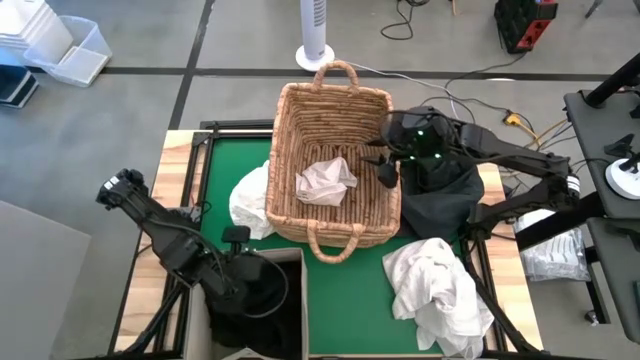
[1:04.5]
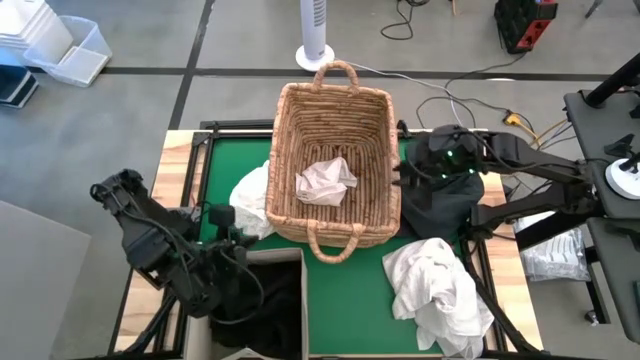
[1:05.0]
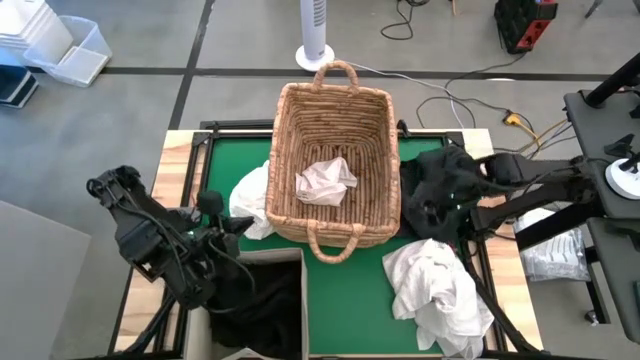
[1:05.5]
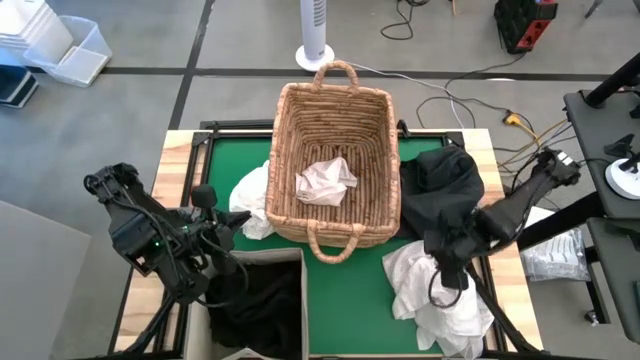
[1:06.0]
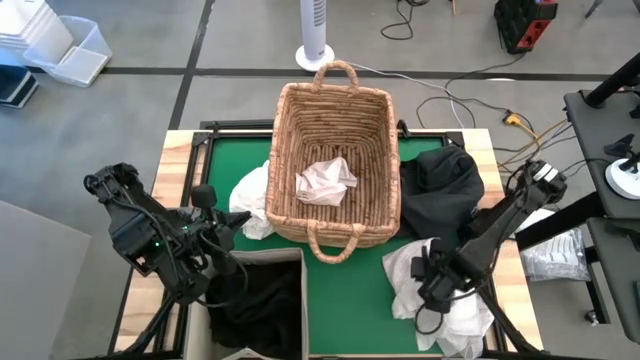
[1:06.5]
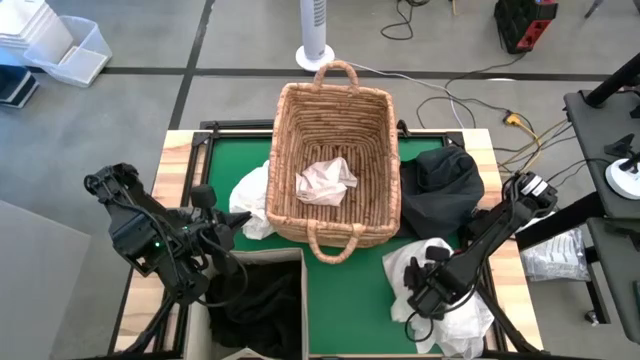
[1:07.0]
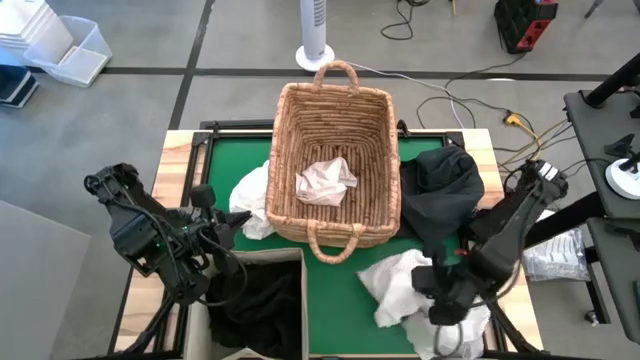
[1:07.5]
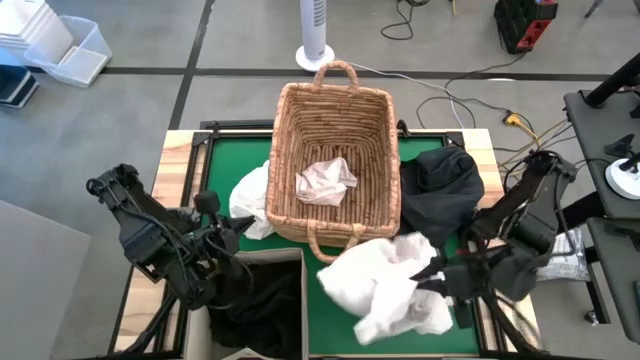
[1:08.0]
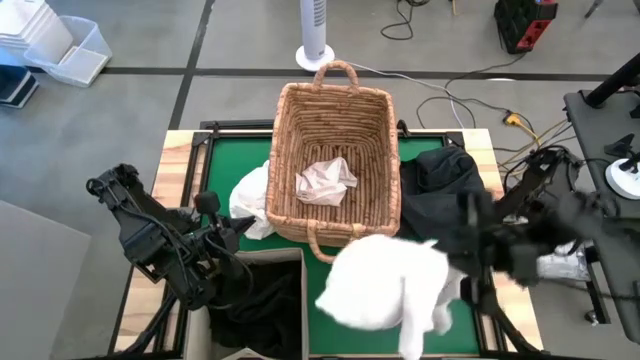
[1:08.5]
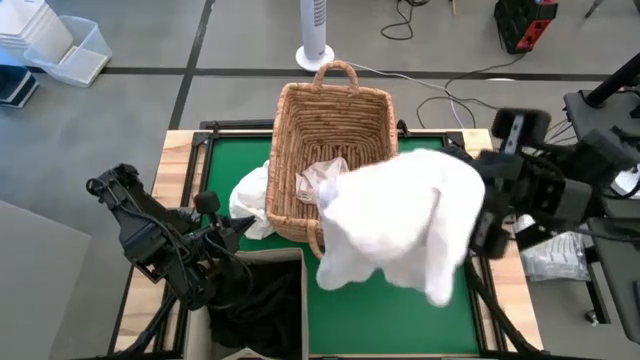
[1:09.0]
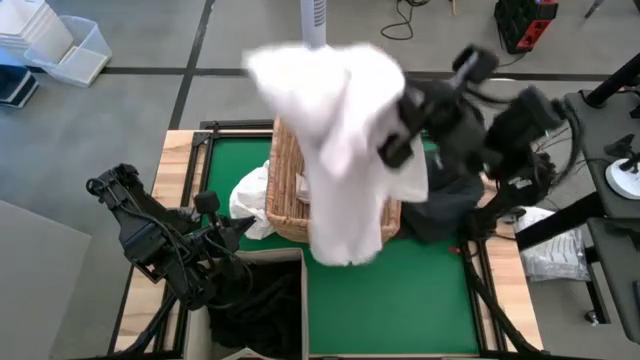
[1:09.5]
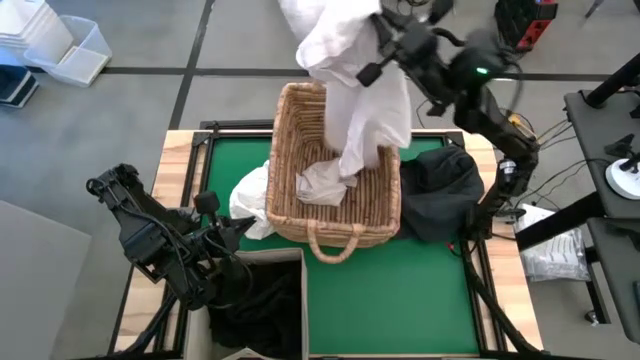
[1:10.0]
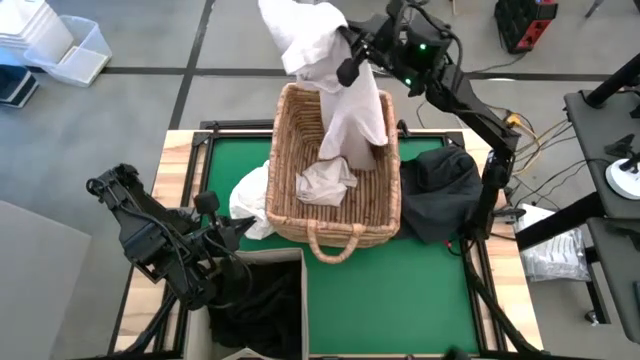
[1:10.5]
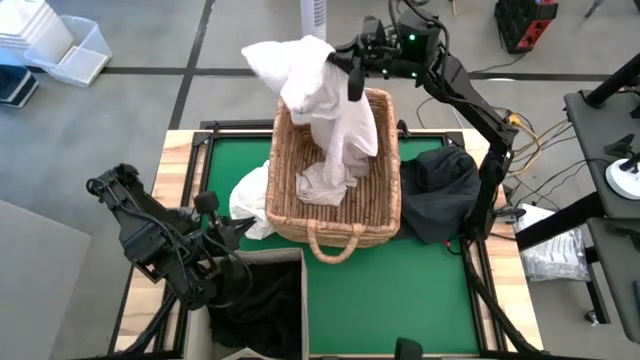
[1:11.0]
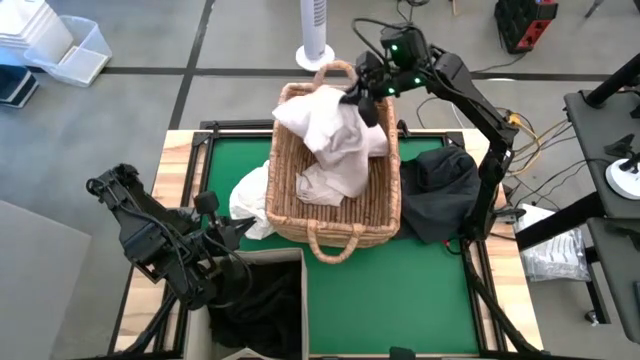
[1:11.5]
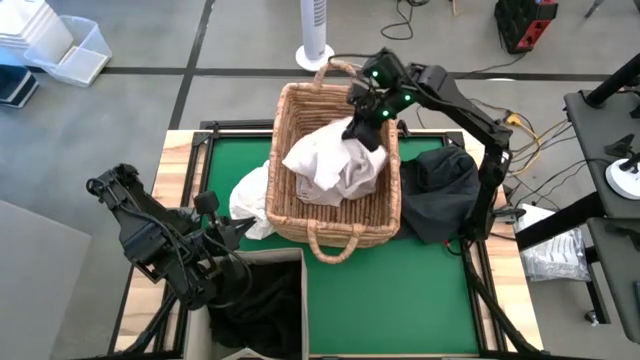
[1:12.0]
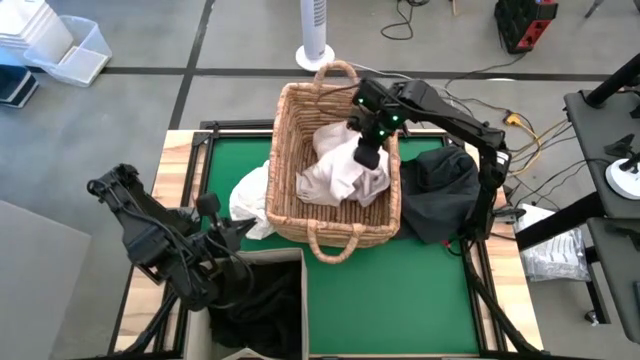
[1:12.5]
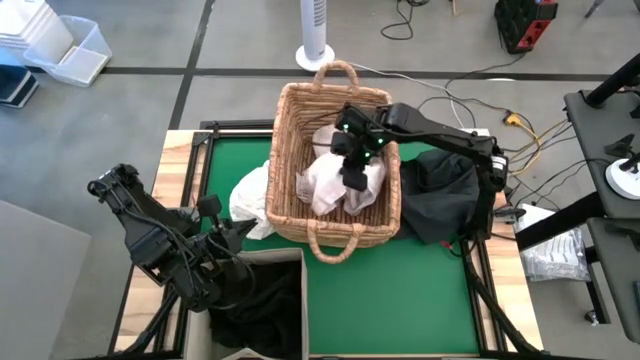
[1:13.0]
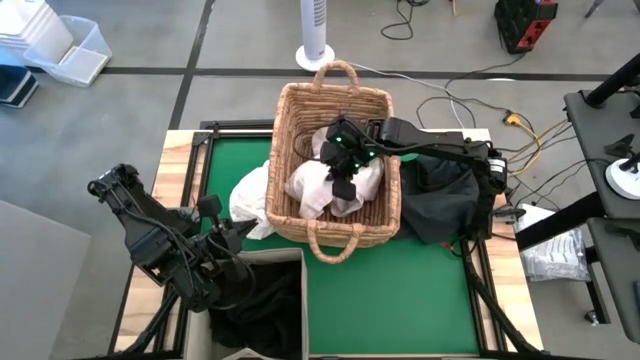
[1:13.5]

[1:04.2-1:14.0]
Put the bottom white shirt into the brown laundry bin

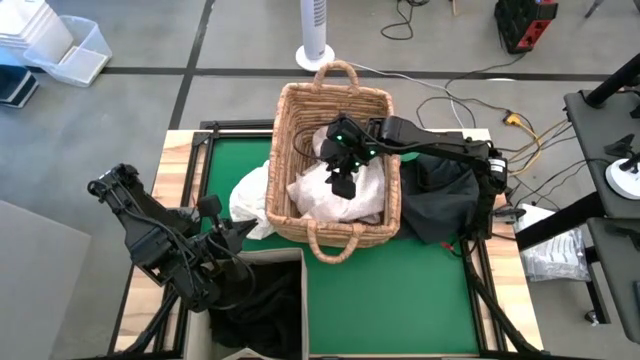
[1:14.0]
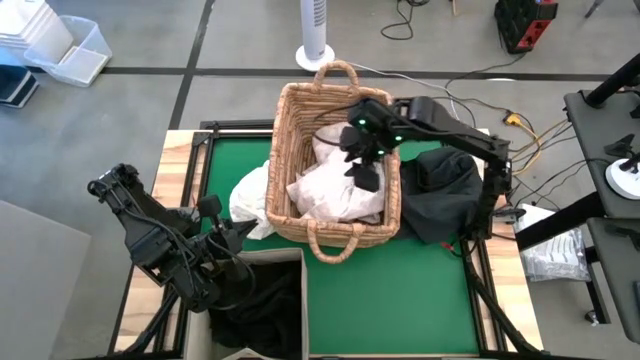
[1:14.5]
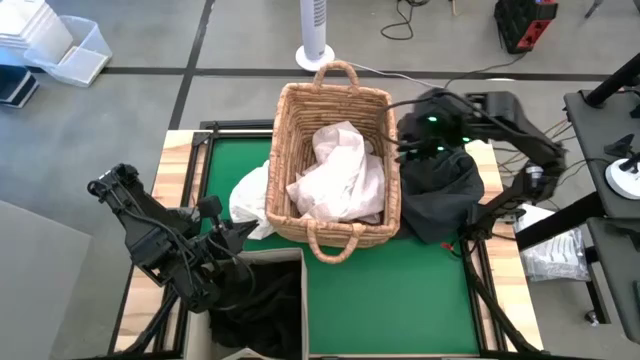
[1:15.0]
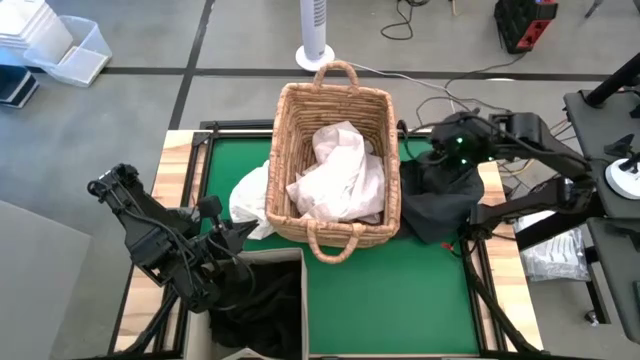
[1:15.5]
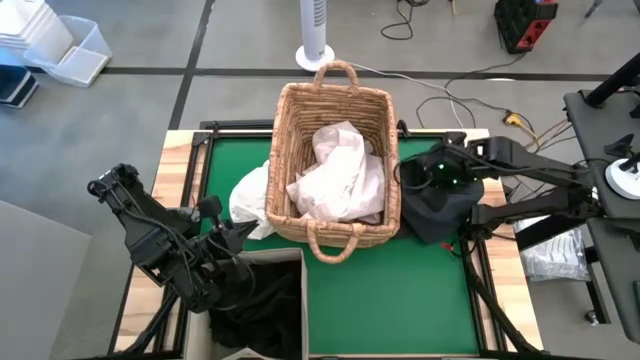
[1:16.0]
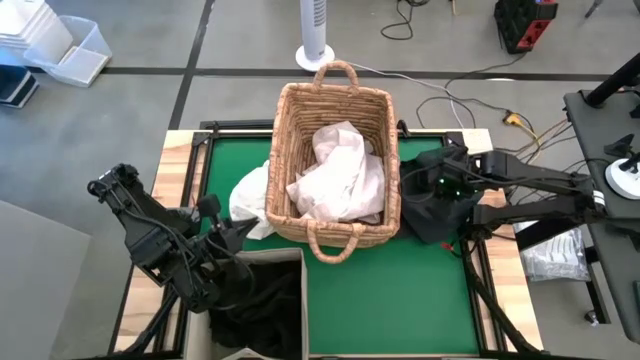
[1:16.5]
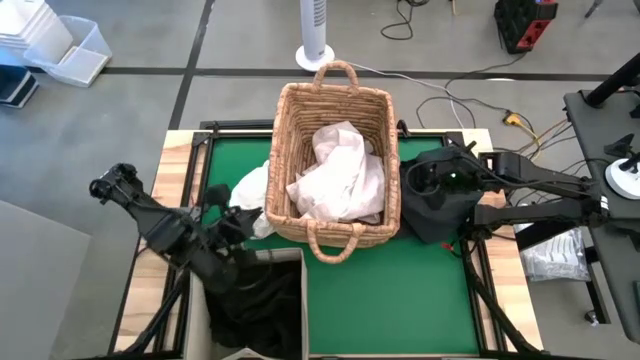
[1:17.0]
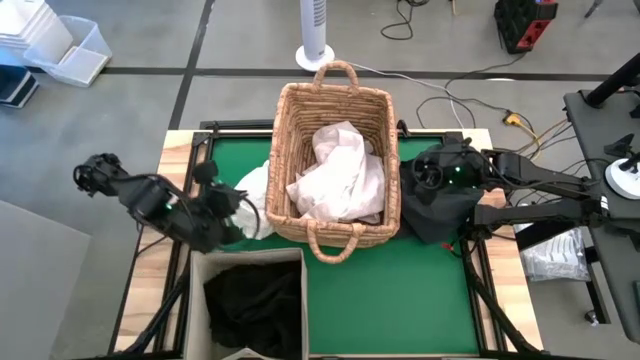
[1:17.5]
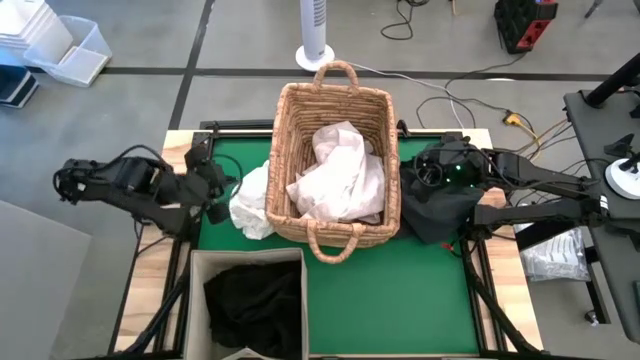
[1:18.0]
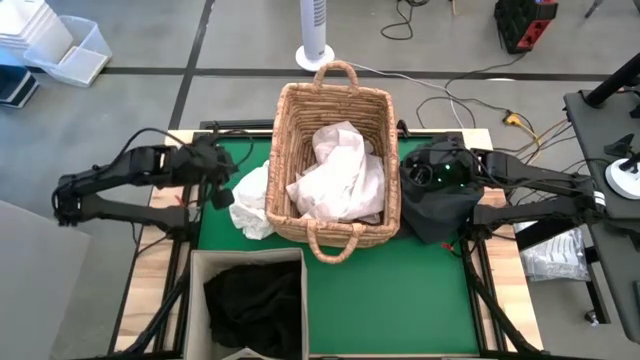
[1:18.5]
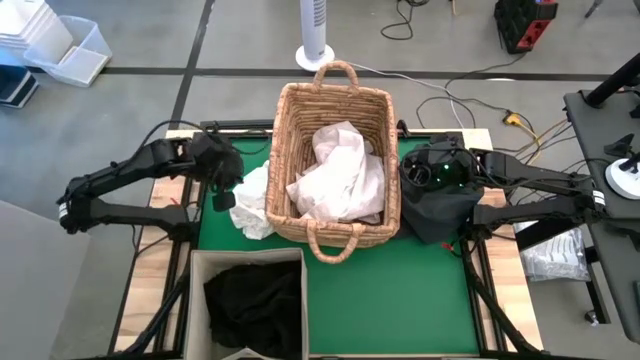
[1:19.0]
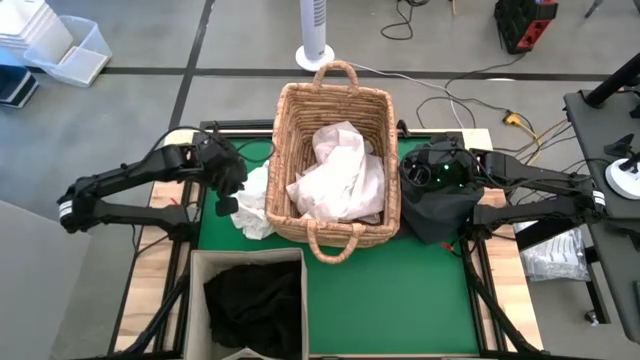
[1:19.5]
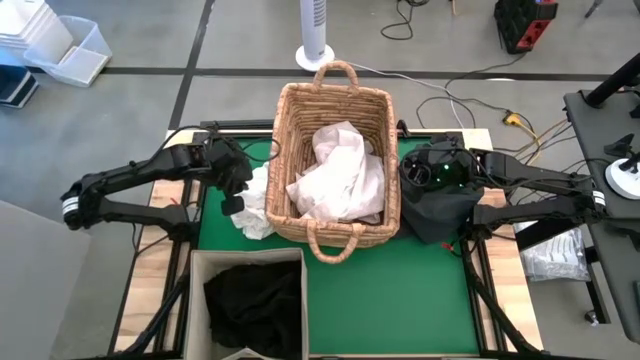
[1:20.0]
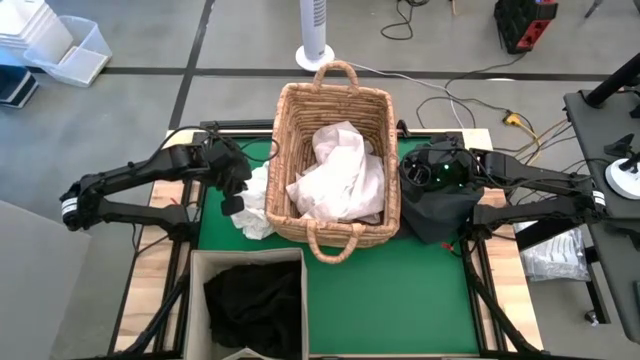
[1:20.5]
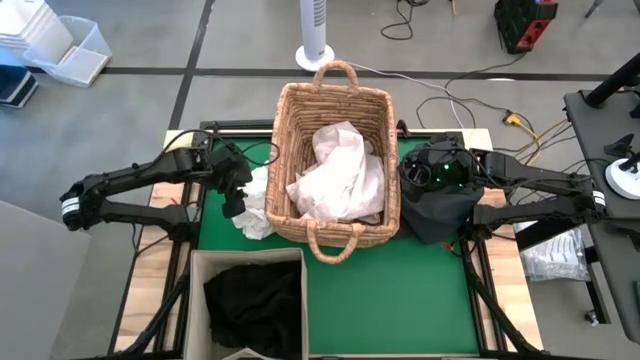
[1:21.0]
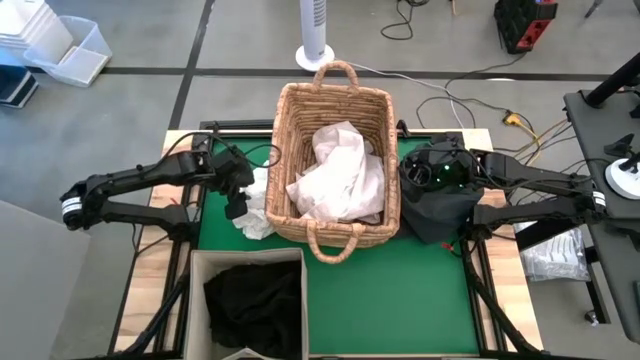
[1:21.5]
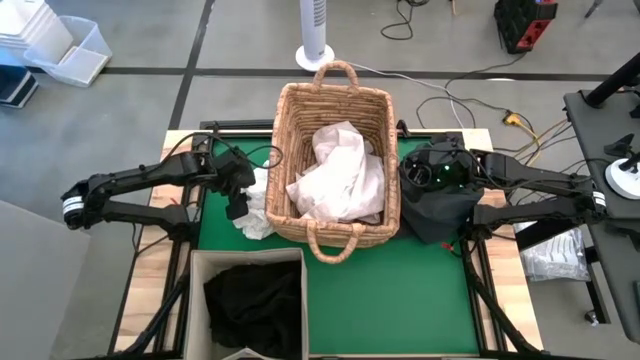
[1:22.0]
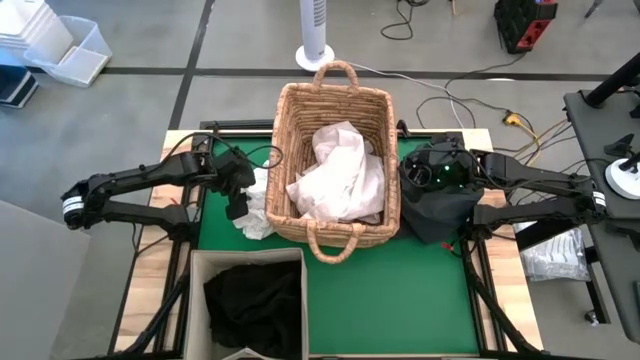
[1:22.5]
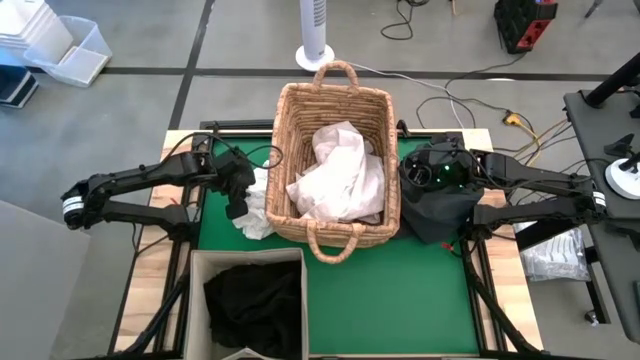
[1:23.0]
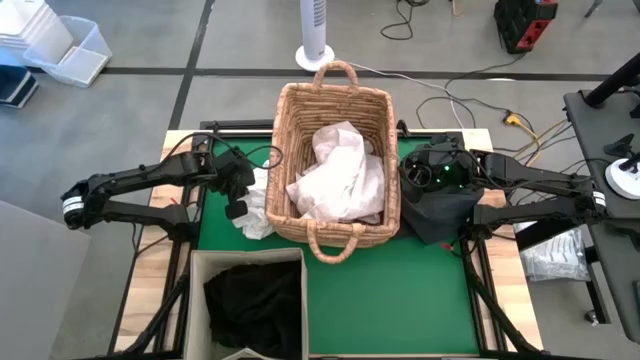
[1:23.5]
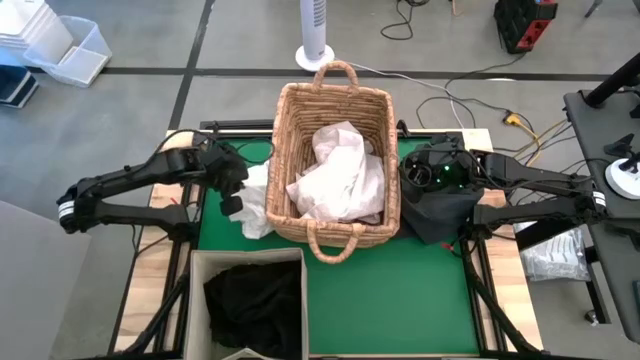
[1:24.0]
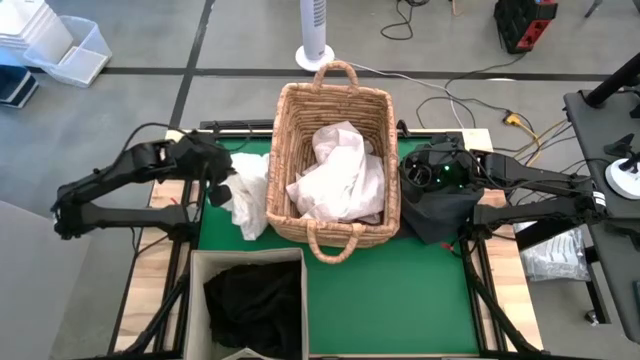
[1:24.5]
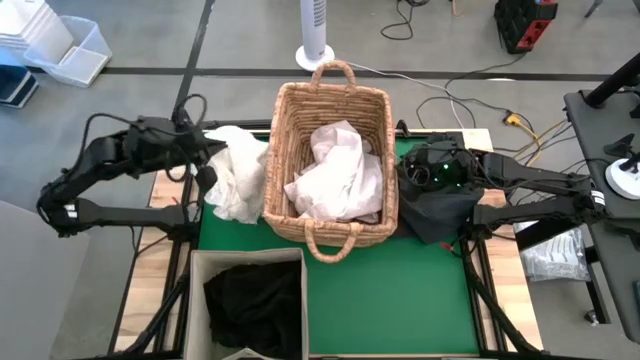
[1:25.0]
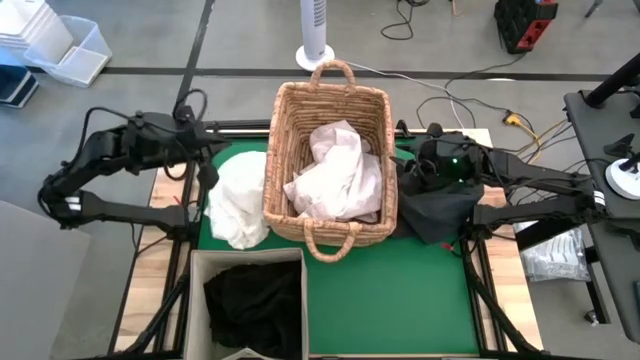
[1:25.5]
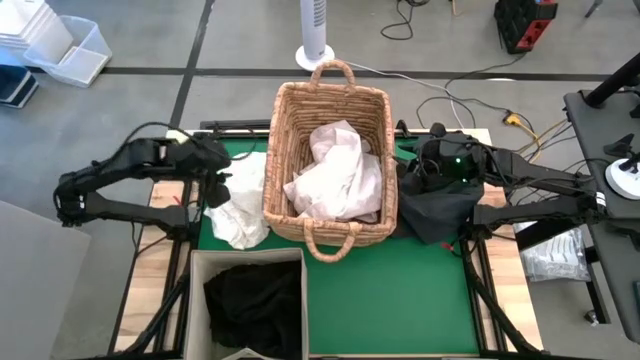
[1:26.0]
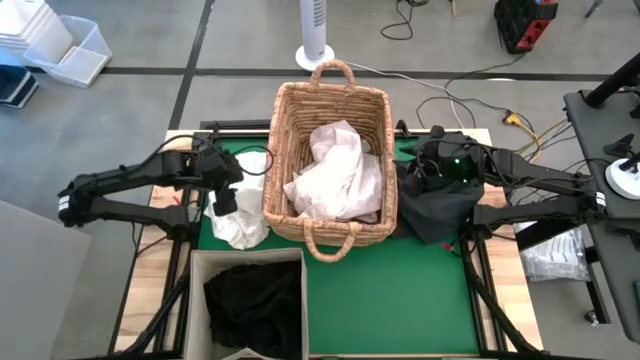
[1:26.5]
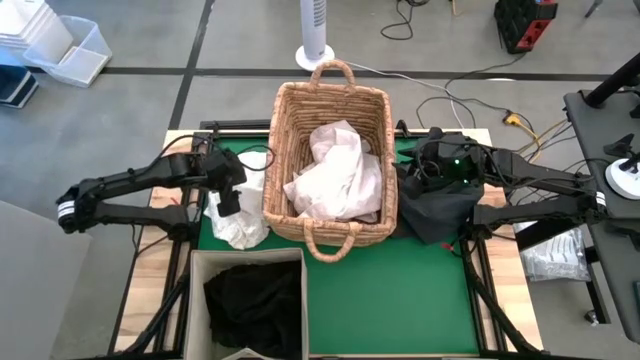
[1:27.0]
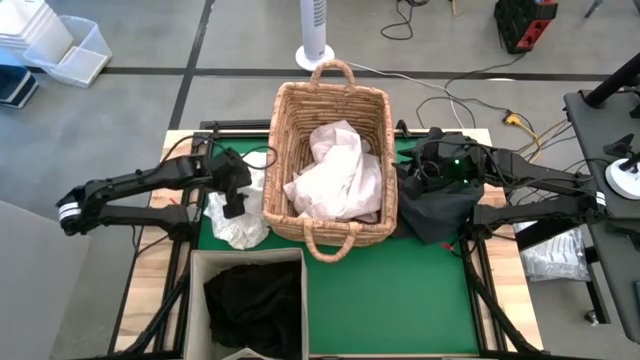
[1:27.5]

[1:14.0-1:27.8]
Put the white shirt into the brown laundry bin
